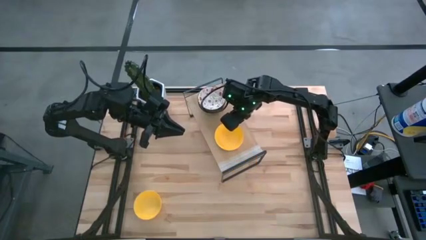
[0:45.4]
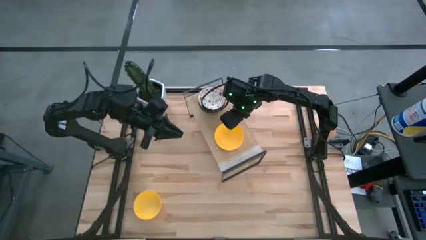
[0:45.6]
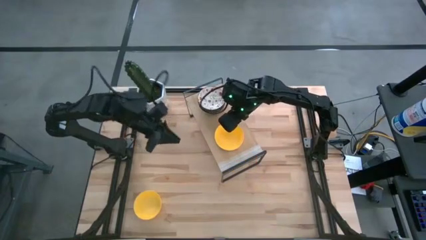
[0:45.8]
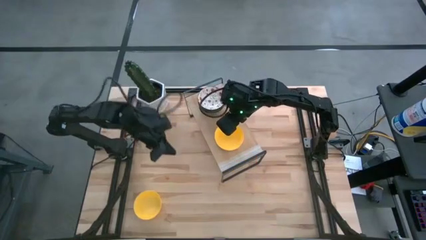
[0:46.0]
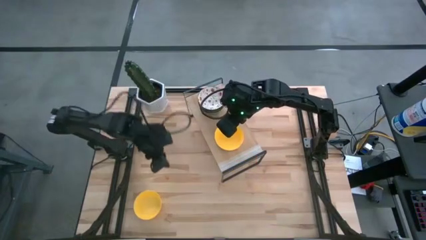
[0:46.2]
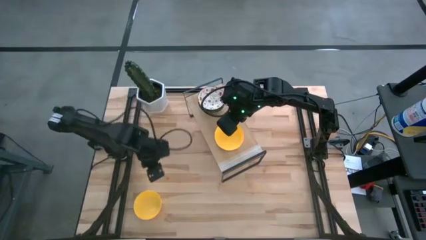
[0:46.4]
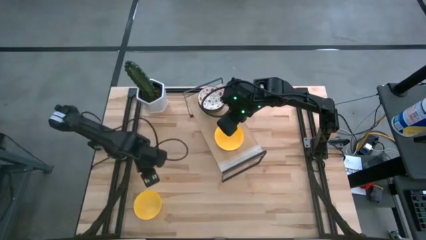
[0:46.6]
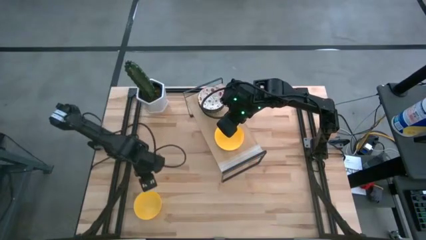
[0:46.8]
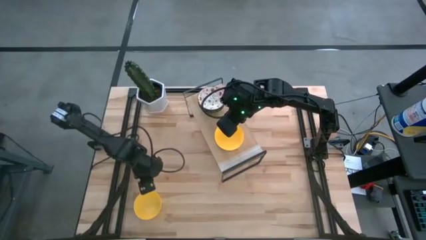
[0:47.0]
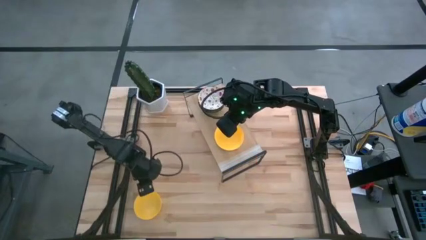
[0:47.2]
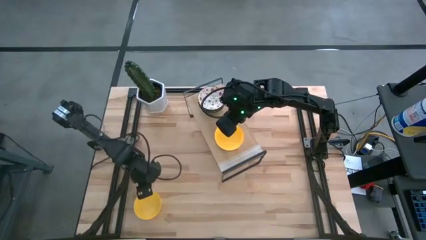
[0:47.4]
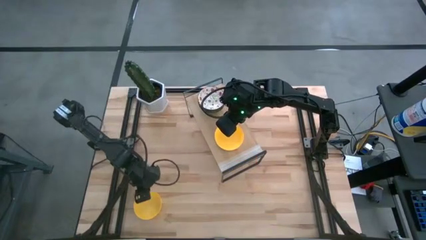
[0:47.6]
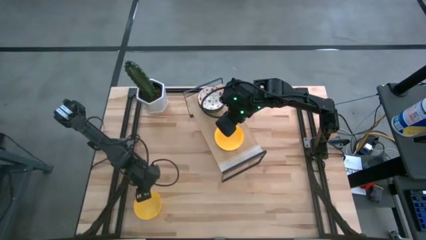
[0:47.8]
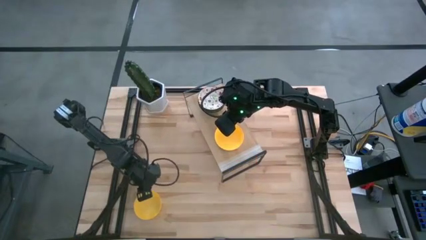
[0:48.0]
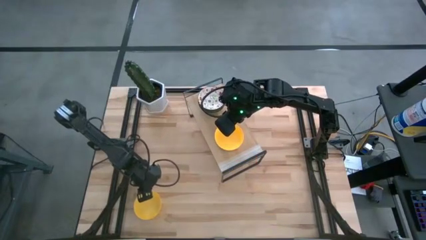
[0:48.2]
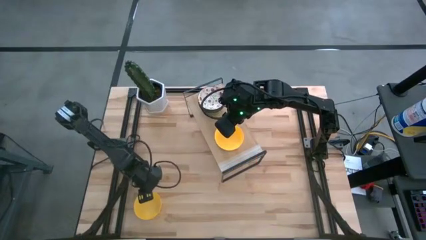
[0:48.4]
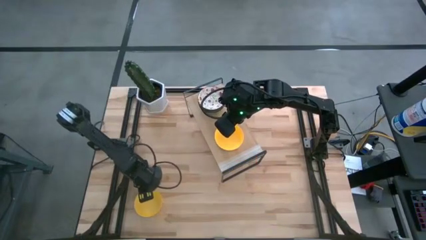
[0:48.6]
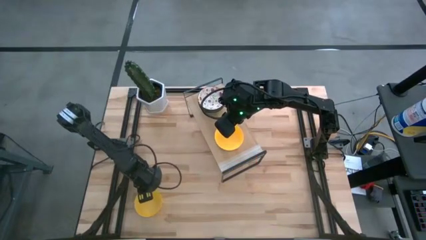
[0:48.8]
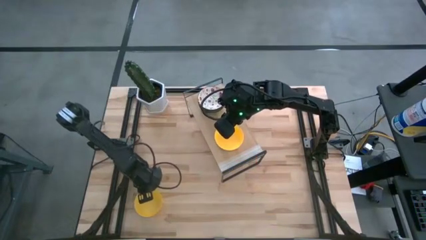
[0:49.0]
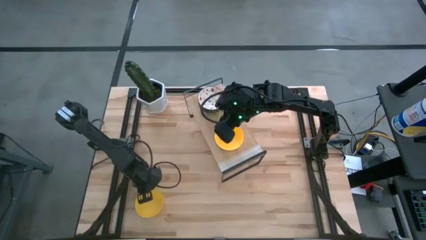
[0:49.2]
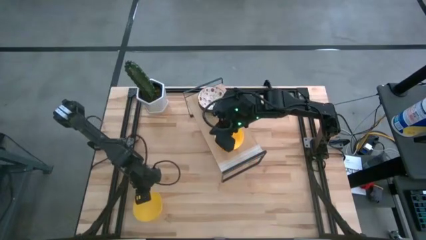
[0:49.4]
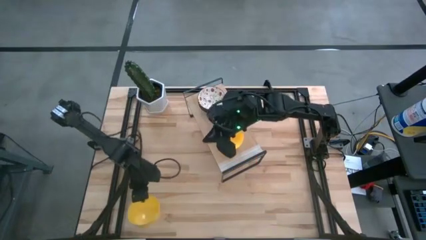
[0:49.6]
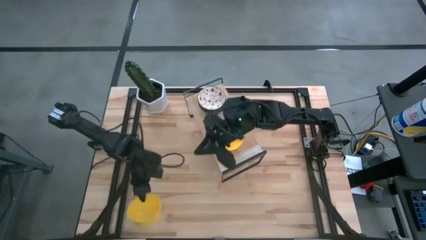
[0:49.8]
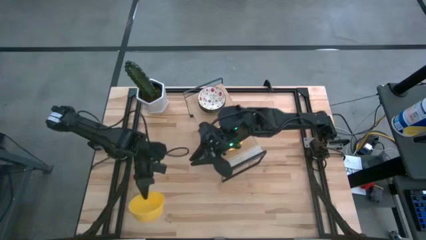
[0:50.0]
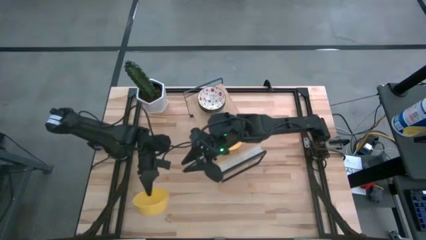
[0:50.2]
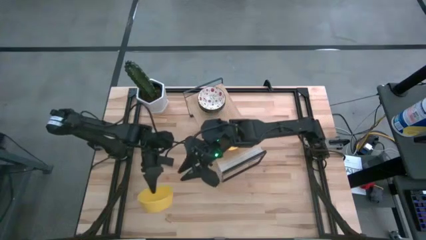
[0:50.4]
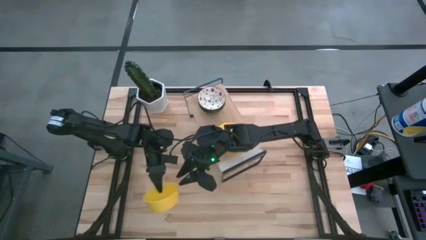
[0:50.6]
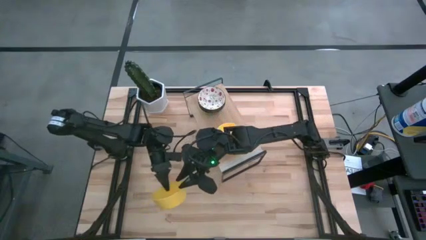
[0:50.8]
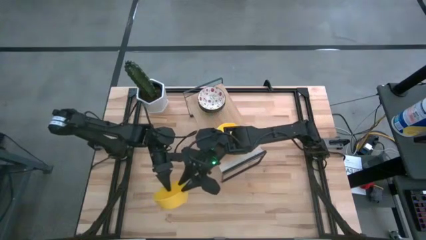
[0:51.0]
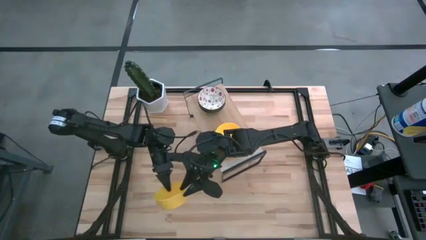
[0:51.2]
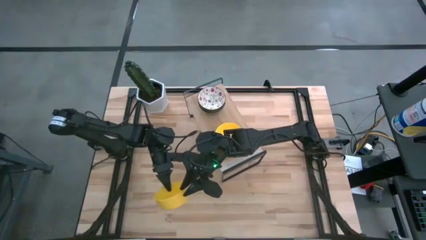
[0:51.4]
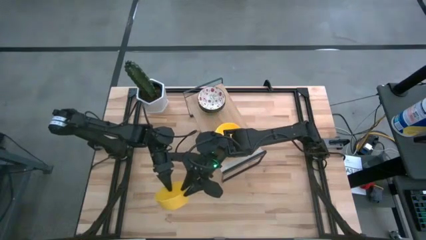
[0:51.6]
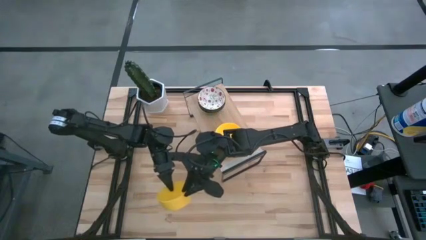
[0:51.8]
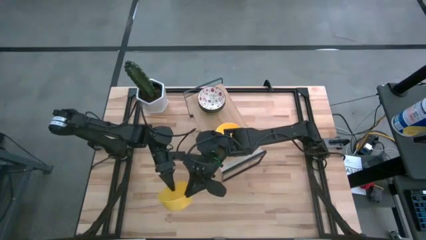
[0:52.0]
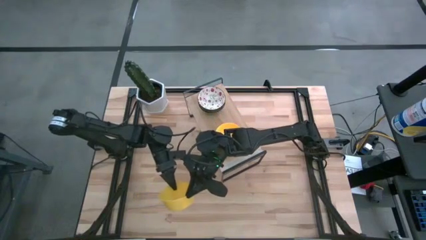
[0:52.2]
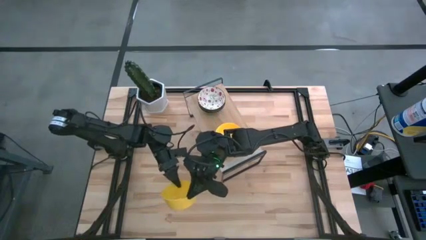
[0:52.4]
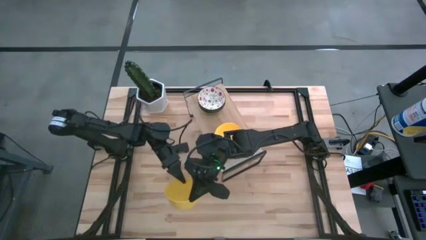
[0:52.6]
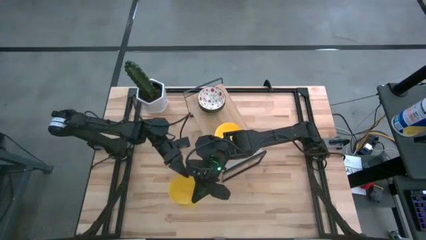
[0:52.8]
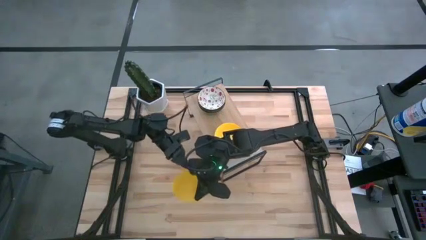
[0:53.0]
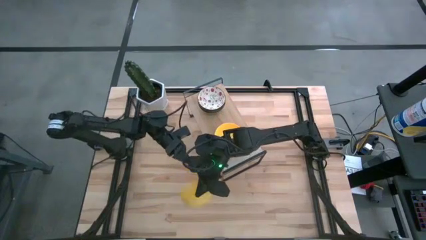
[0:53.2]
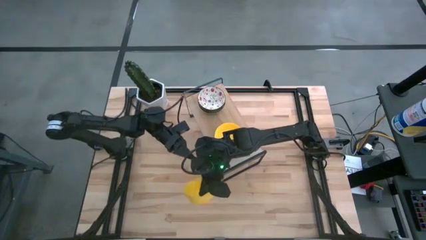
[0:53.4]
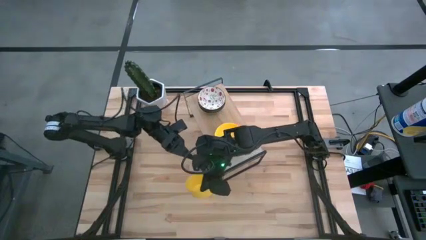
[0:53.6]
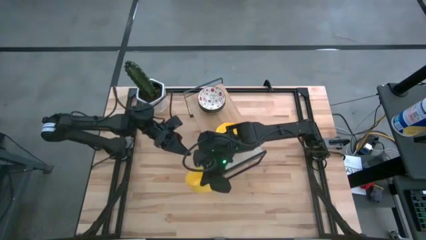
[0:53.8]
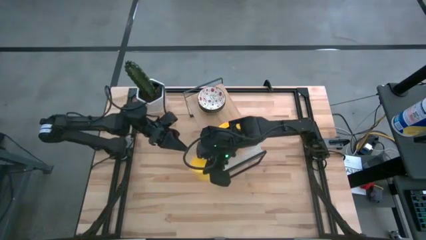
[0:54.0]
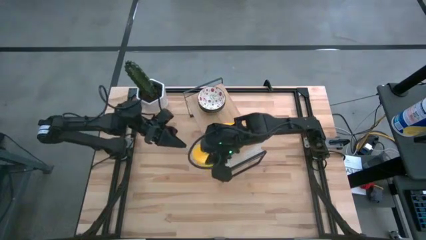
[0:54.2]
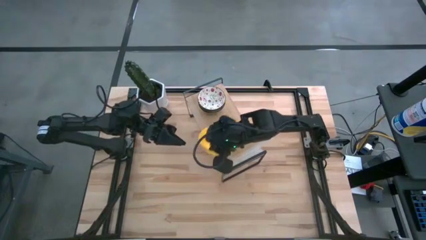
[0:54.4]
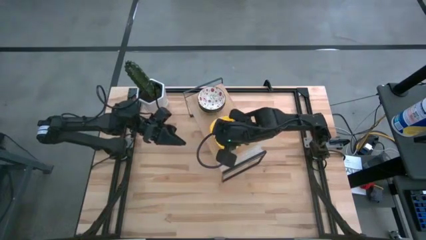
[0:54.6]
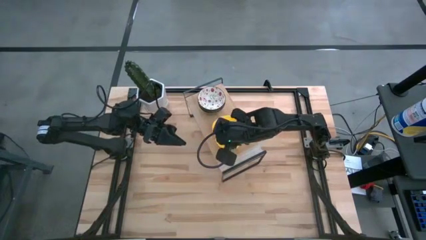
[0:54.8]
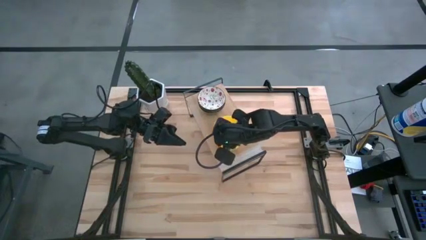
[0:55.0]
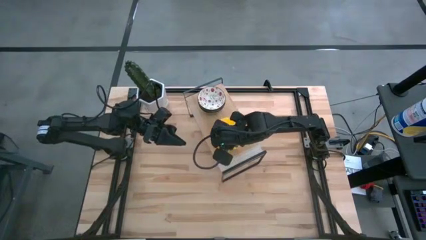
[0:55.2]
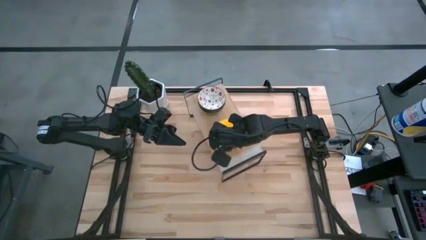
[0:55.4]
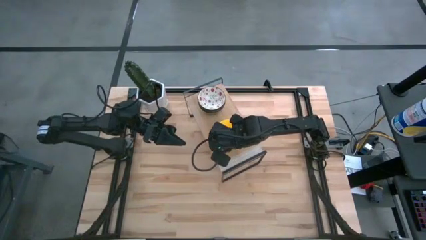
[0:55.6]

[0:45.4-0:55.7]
Task: Pick & Place Mini bowls
Stack the yellow bowl on the stacked yellow bowls on the shelf

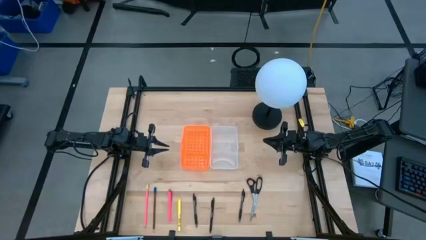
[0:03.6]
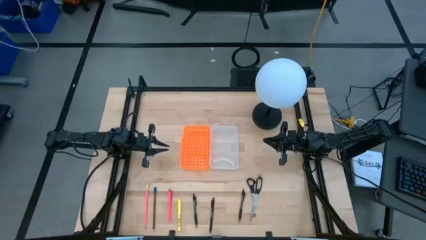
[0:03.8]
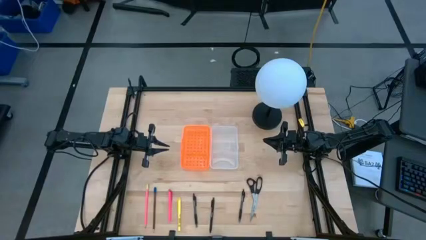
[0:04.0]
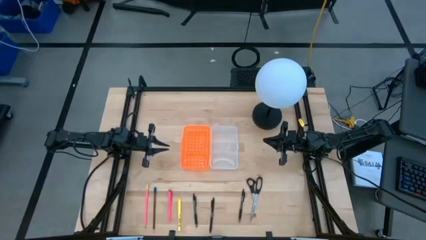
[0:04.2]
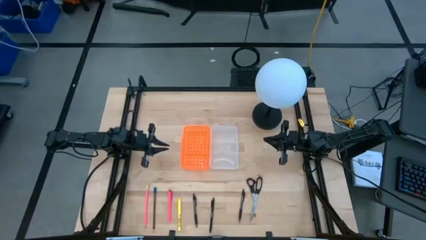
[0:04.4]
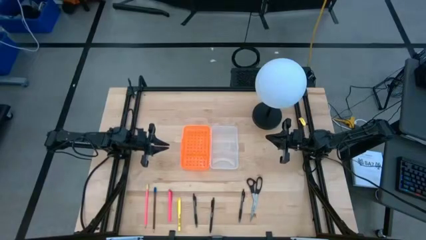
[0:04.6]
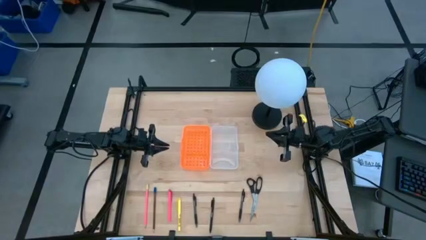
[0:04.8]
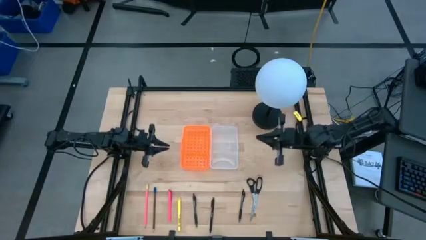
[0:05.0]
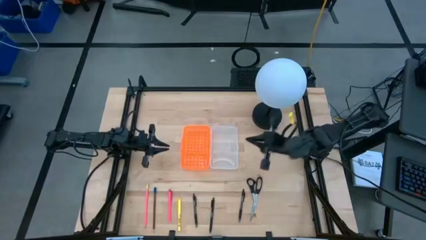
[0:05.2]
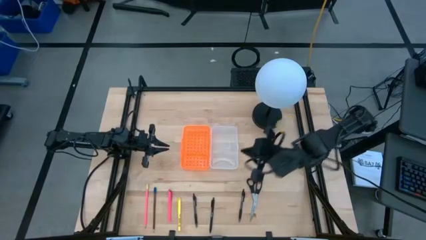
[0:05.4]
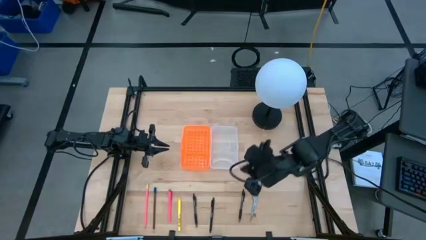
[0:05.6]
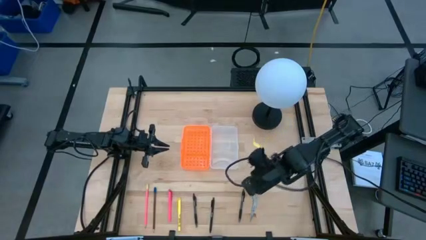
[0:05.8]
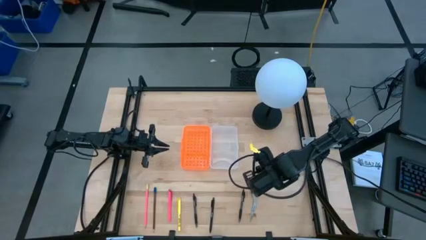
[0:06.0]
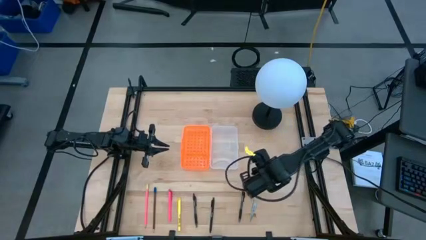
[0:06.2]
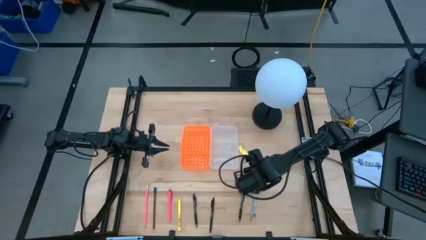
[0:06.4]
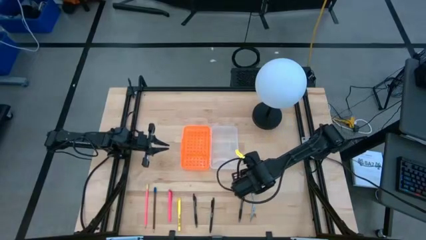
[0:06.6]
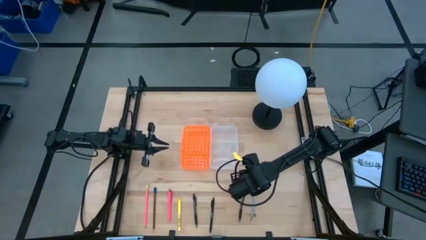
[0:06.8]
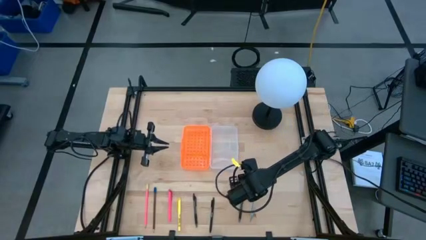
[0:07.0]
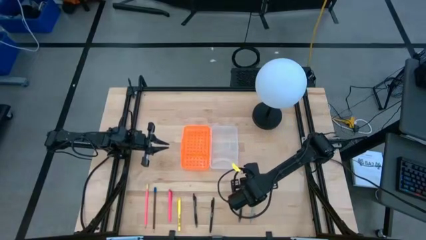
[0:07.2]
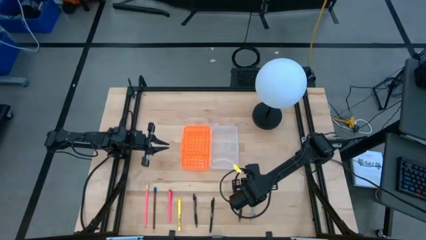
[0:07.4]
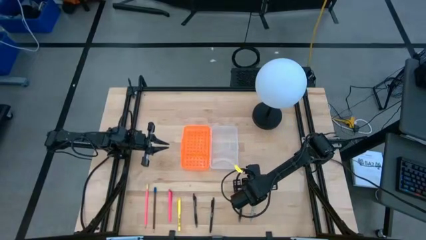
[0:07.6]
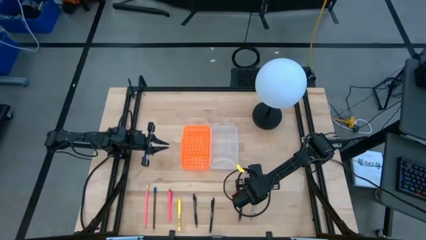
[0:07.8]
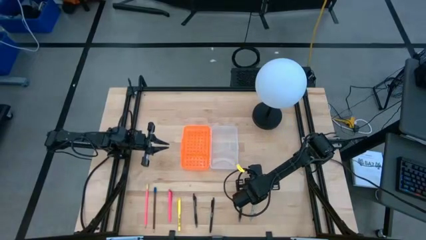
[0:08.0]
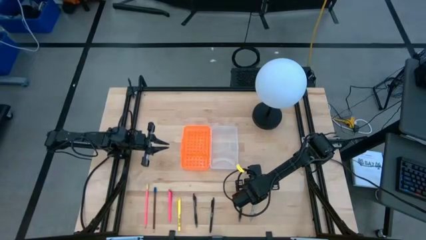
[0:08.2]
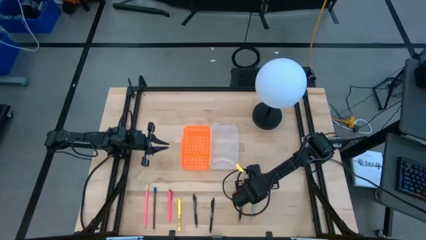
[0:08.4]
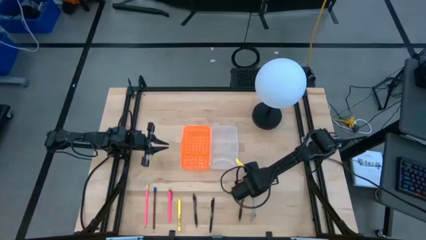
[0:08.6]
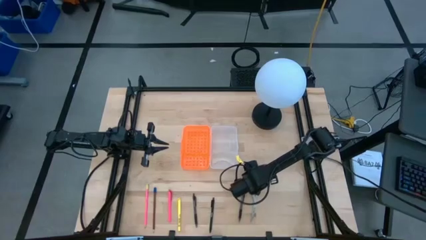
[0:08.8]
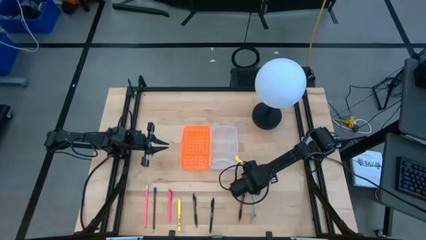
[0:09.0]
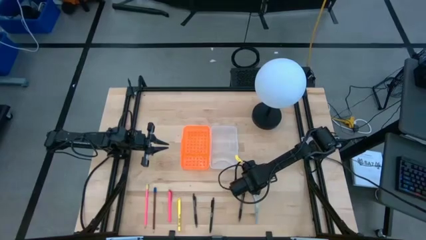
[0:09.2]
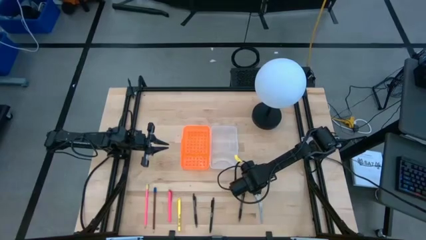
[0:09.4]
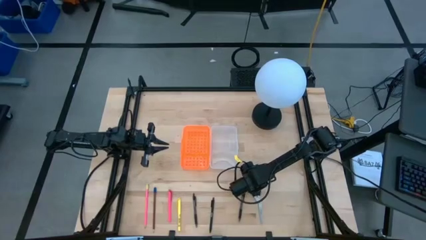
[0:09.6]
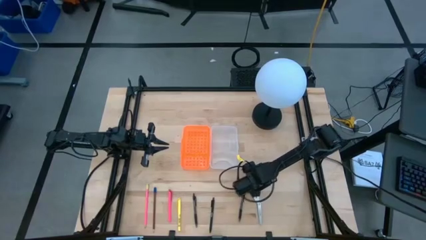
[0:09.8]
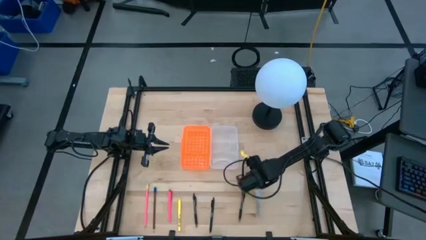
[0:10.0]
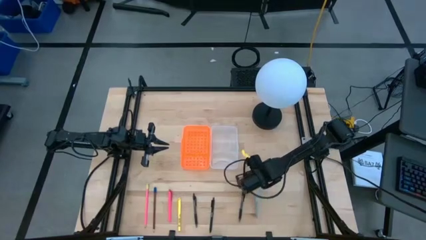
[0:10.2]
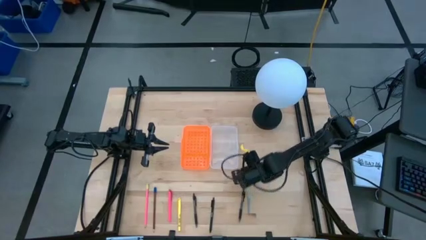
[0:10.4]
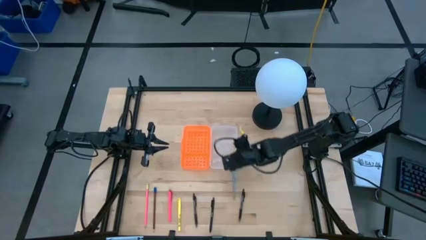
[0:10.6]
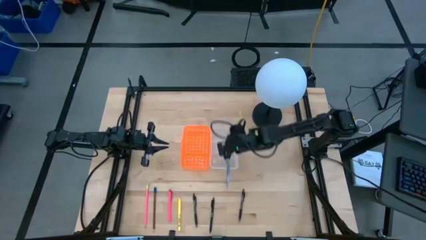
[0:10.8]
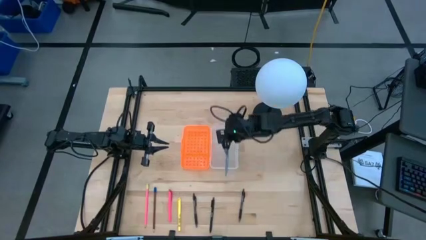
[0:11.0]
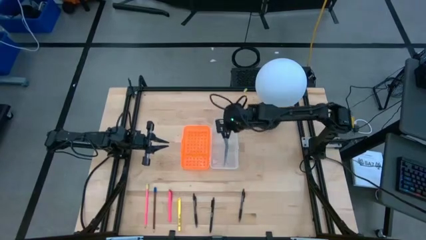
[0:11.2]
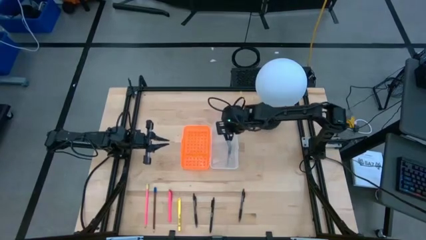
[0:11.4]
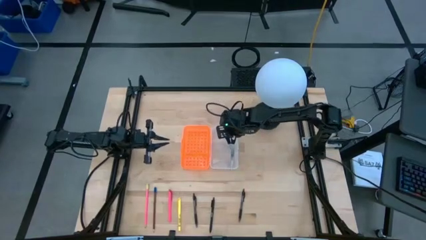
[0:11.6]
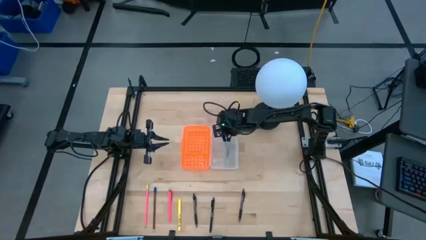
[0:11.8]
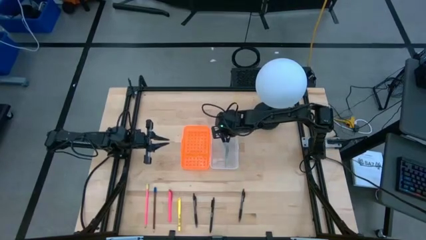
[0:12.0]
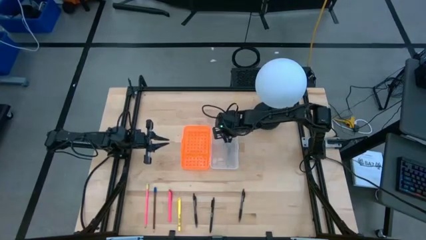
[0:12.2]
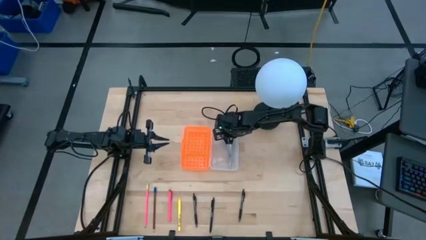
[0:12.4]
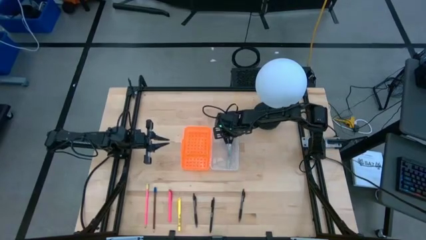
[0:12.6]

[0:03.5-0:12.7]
Task: Pick & place school supplies into a supply box
Put the black scissors into the orange box
